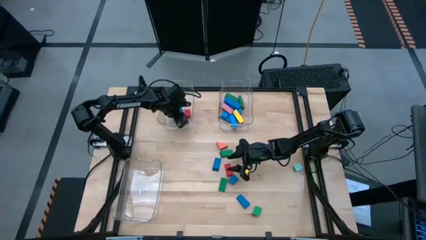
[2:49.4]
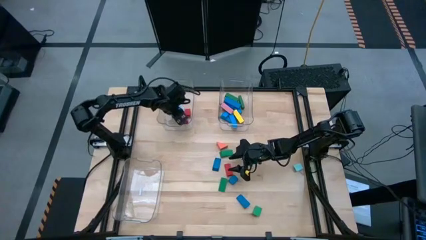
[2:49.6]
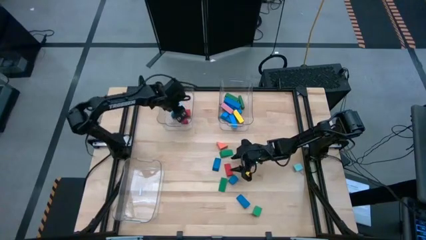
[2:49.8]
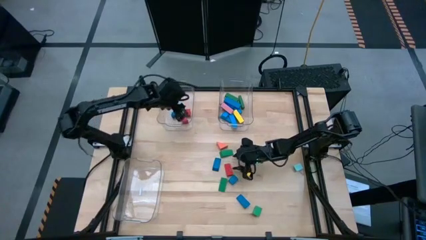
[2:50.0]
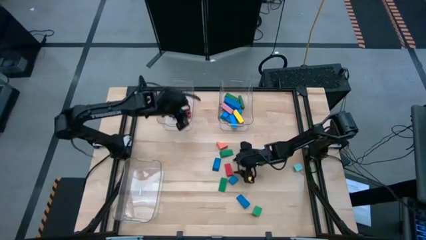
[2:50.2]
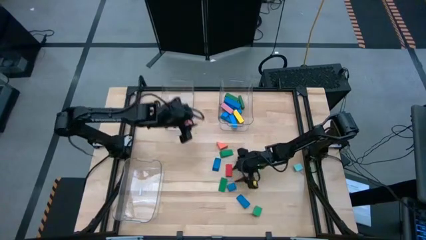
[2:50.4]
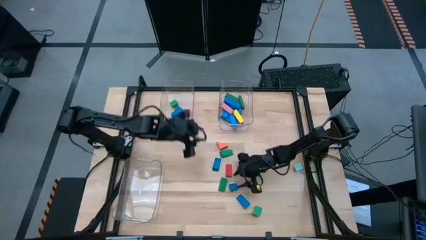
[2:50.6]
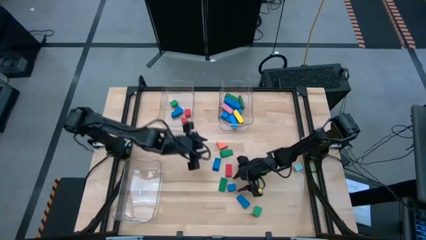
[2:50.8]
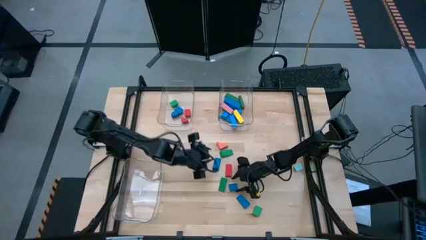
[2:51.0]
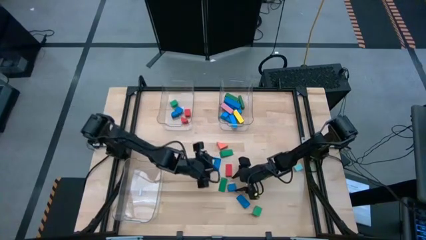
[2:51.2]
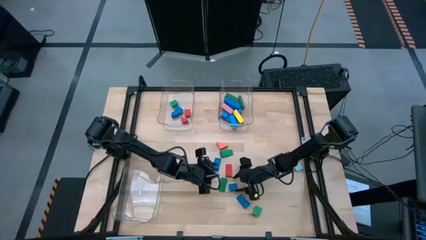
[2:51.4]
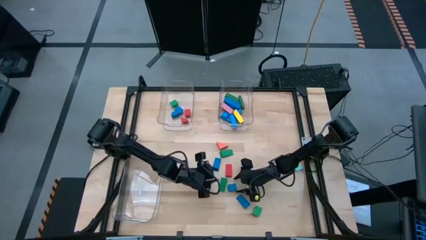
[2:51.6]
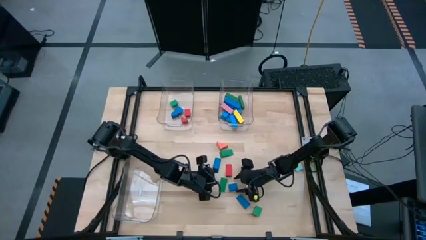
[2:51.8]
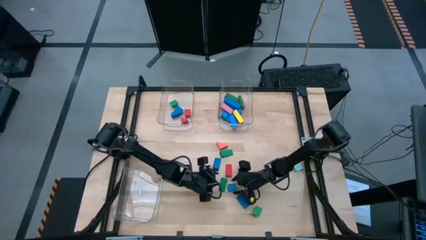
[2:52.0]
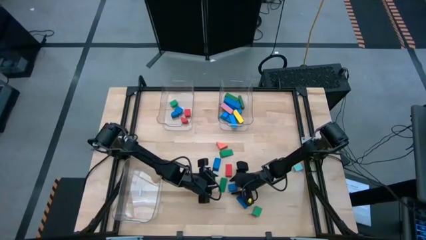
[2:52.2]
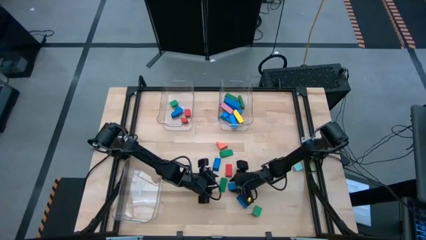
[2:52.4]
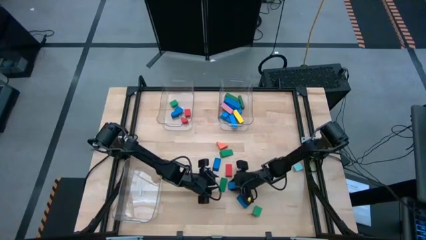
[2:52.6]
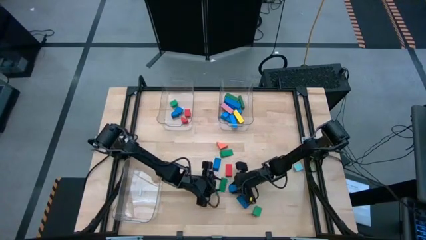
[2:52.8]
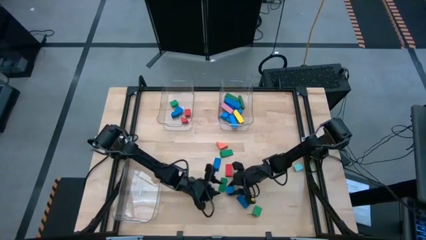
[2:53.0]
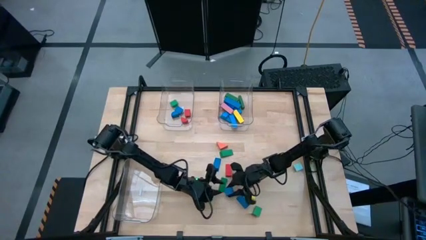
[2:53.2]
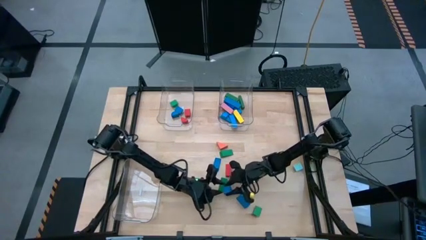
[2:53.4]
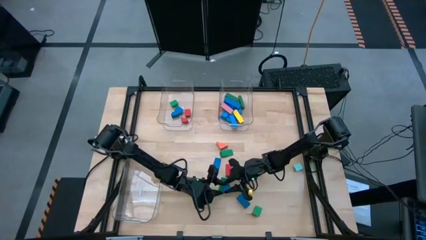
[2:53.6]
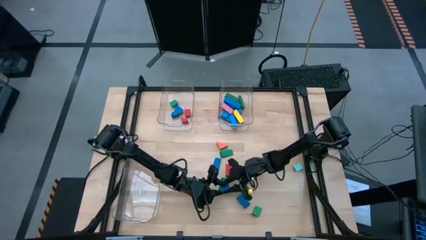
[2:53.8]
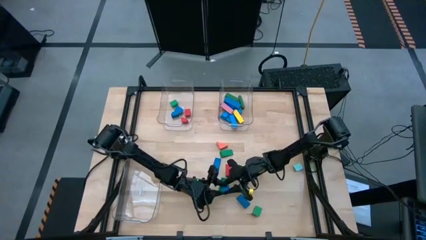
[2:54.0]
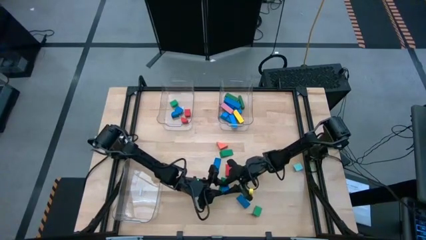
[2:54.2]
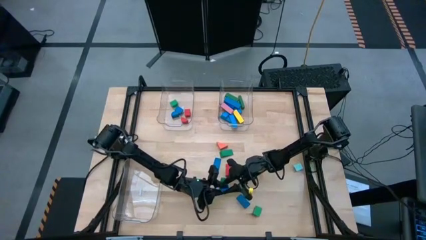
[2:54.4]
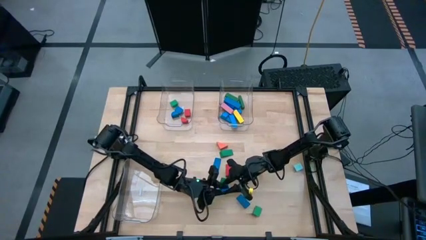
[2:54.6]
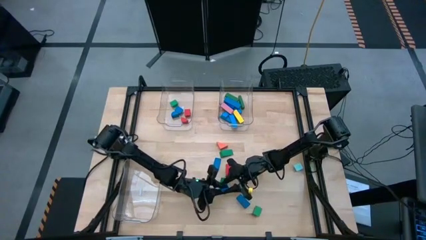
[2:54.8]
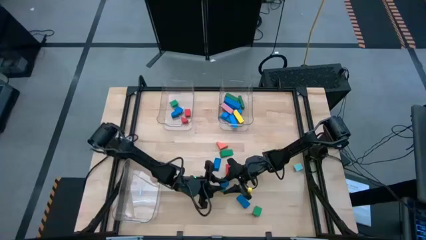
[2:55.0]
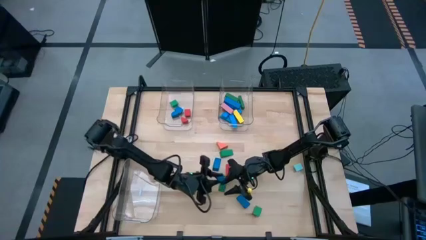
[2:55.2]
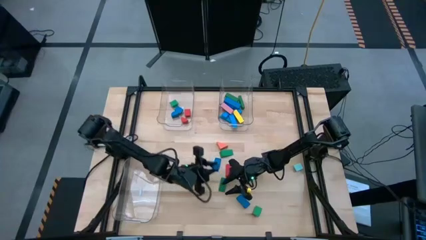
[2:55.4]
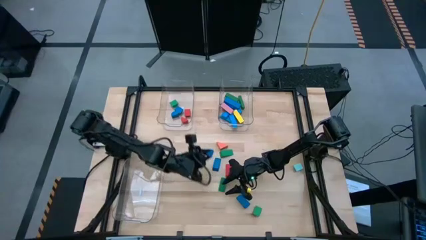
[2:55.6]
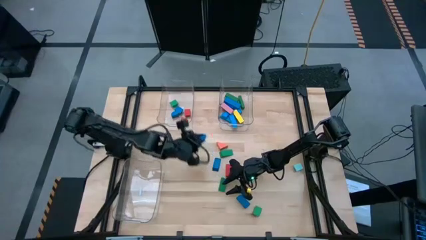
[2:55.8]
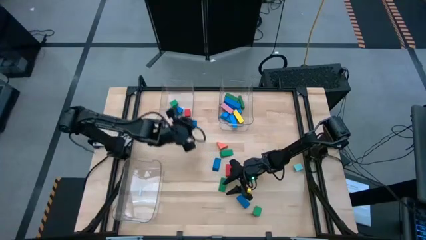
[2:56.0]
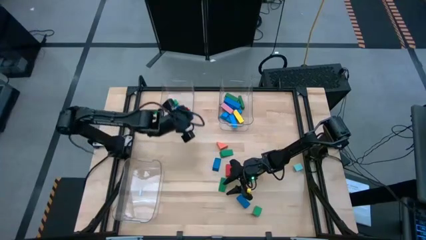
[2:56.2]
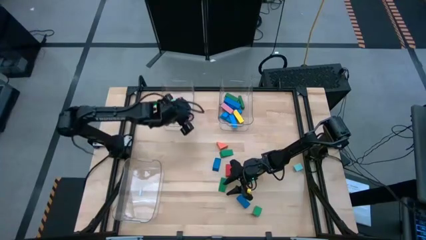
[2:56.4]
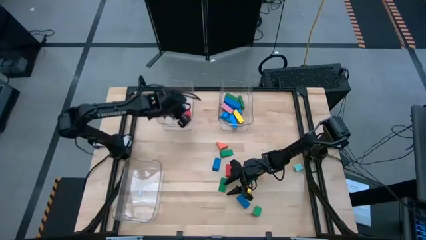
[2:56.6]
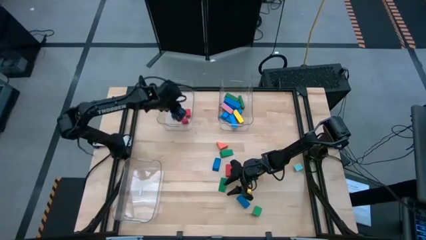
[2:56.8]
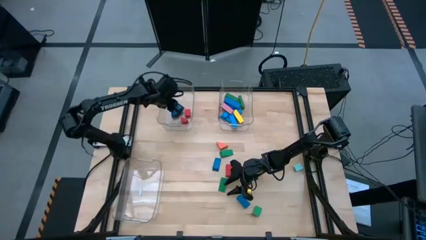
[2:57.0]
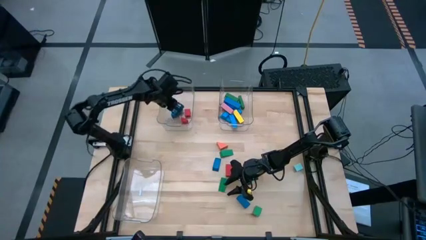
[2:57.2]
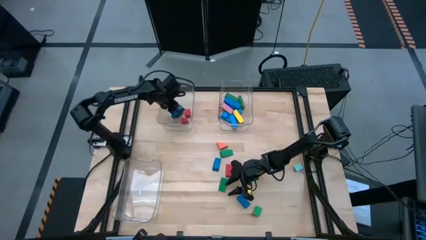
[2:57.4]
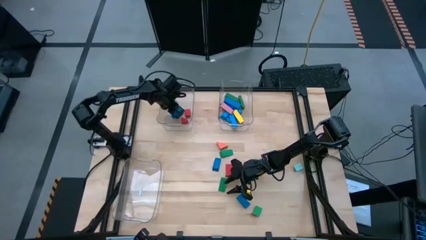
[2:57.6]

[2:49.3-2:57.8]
Task: Sort blocks by size
Put the blue half cylinder block into the top left transparent bin

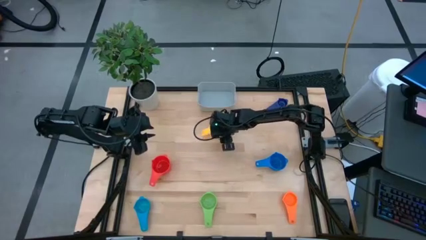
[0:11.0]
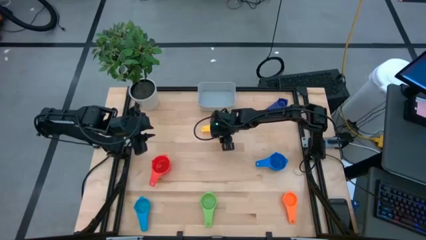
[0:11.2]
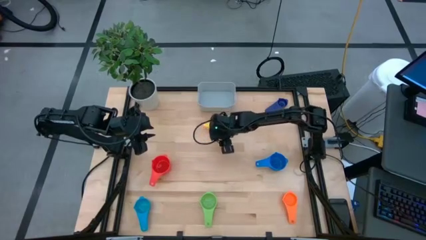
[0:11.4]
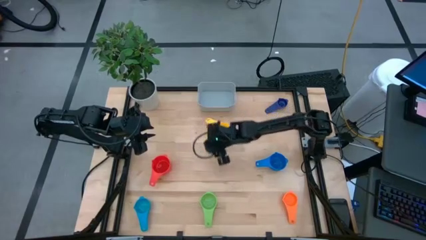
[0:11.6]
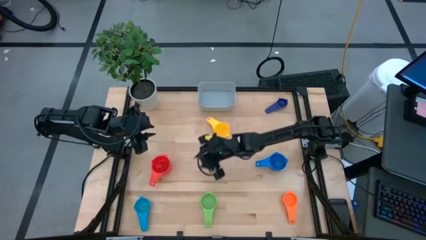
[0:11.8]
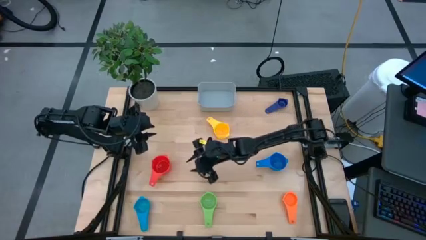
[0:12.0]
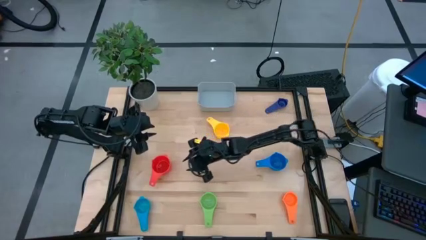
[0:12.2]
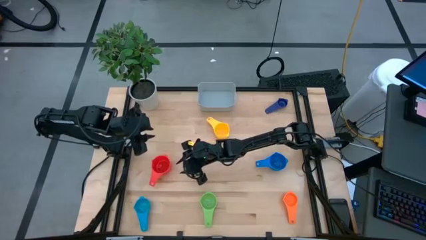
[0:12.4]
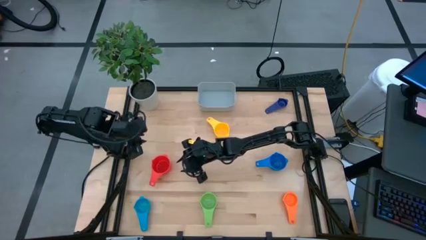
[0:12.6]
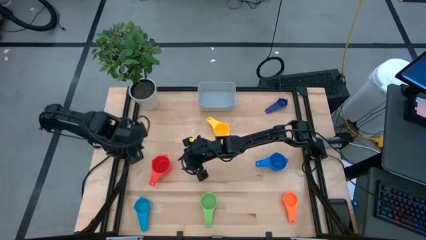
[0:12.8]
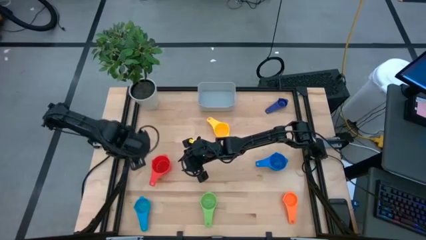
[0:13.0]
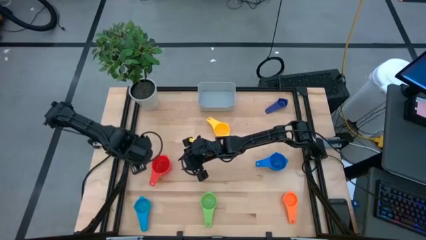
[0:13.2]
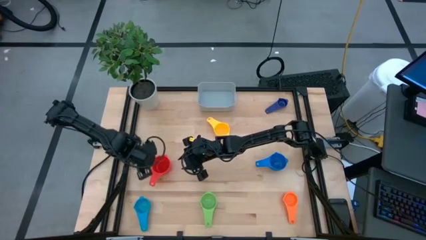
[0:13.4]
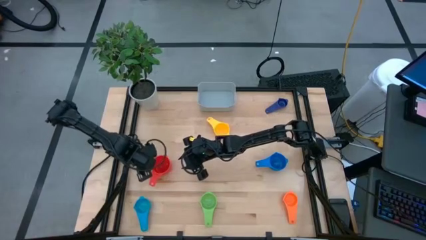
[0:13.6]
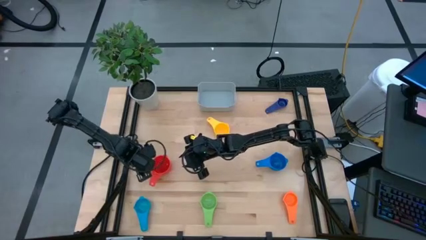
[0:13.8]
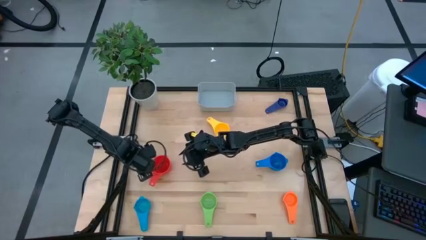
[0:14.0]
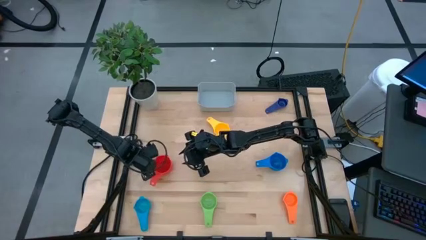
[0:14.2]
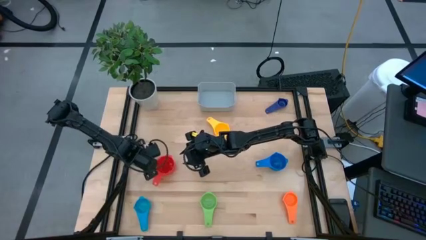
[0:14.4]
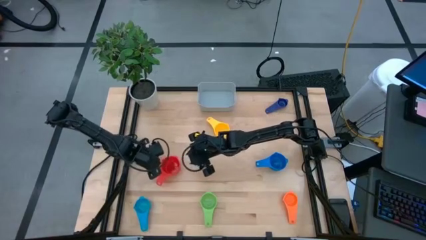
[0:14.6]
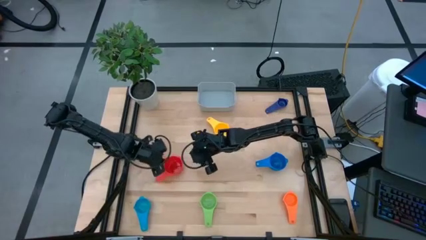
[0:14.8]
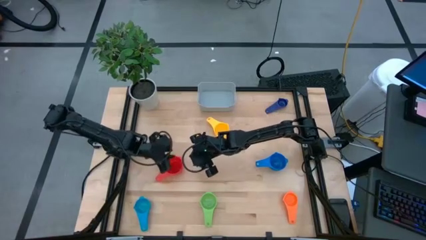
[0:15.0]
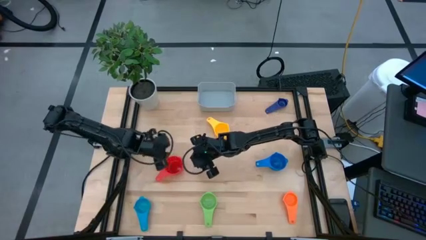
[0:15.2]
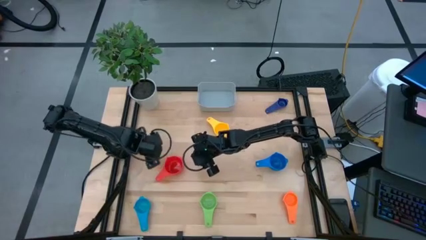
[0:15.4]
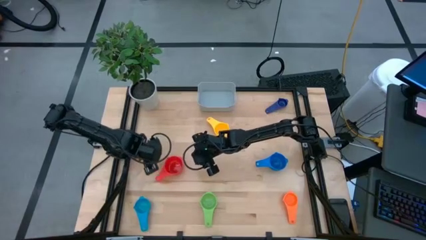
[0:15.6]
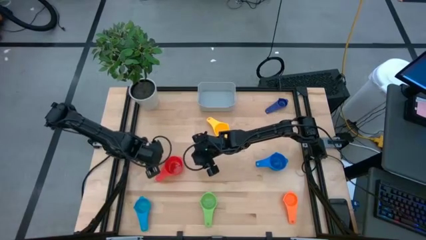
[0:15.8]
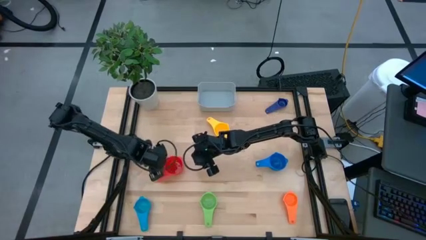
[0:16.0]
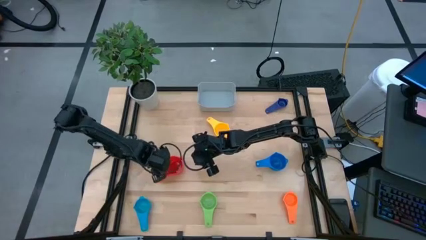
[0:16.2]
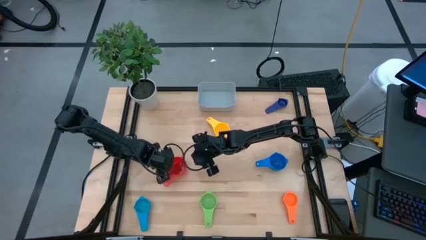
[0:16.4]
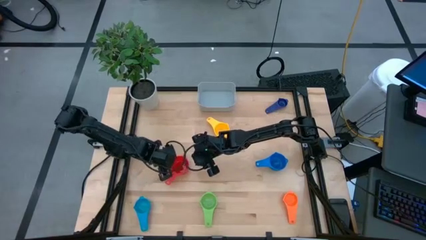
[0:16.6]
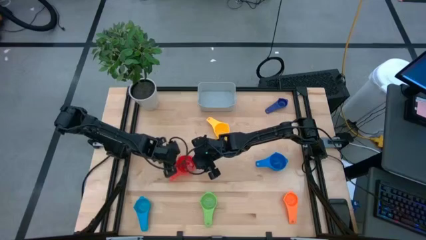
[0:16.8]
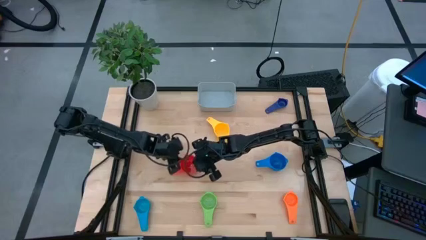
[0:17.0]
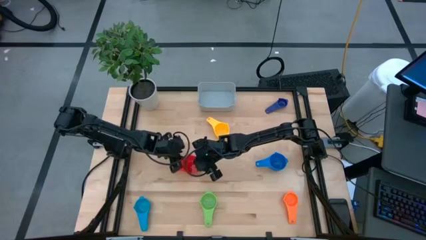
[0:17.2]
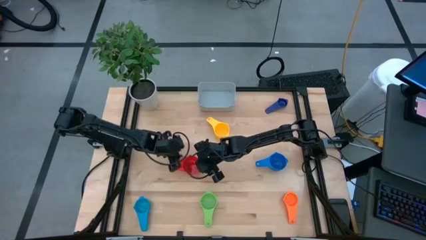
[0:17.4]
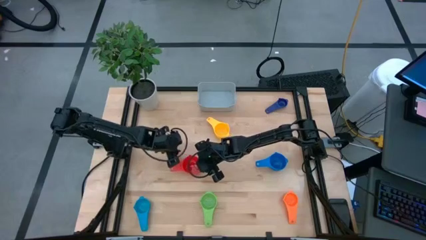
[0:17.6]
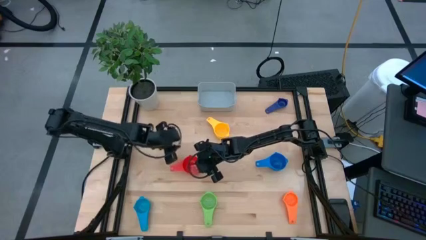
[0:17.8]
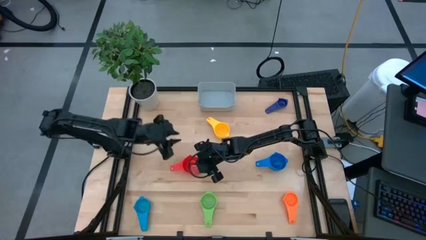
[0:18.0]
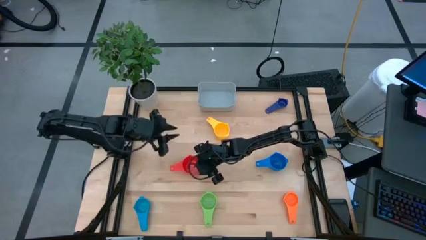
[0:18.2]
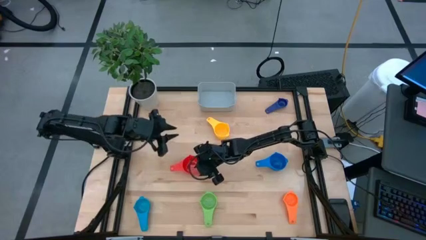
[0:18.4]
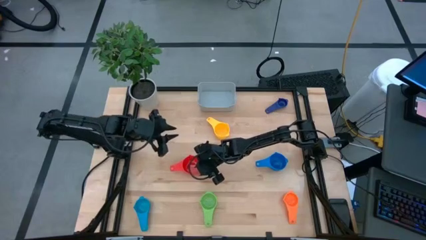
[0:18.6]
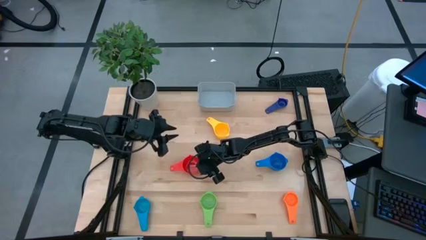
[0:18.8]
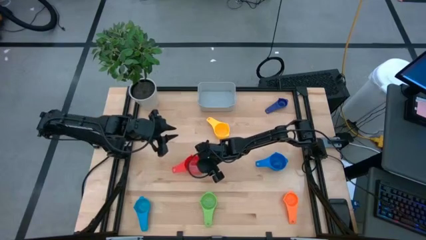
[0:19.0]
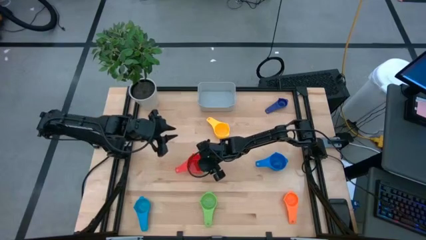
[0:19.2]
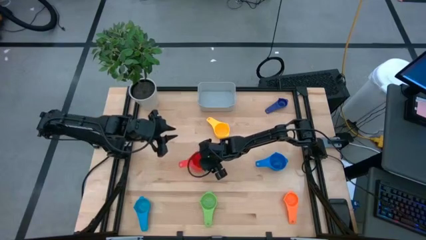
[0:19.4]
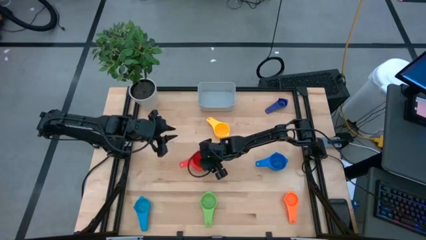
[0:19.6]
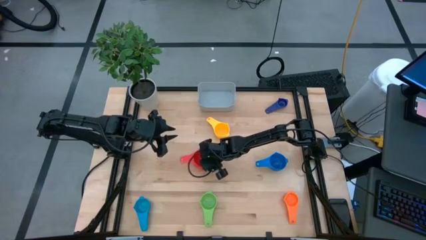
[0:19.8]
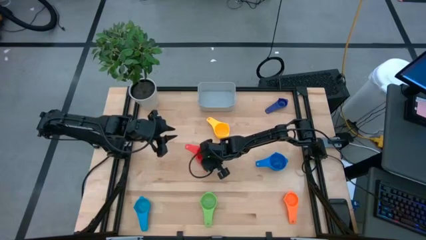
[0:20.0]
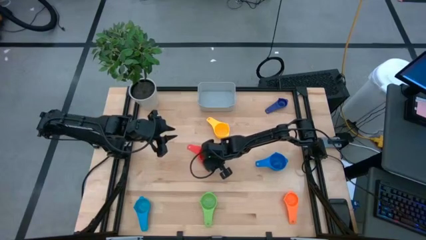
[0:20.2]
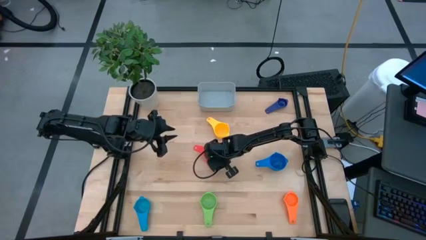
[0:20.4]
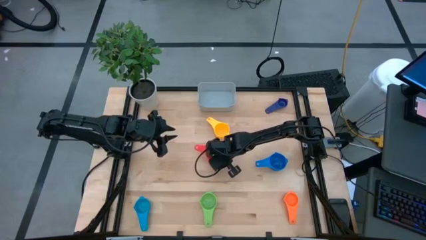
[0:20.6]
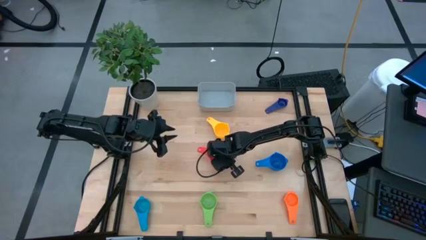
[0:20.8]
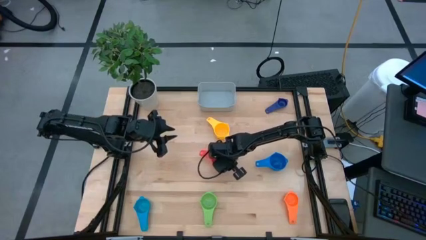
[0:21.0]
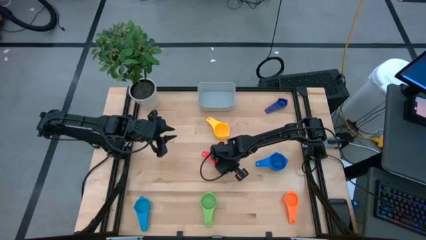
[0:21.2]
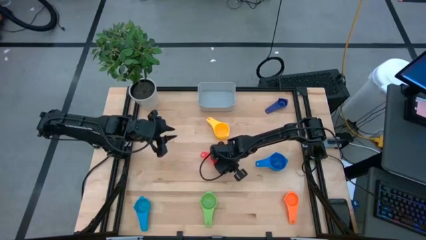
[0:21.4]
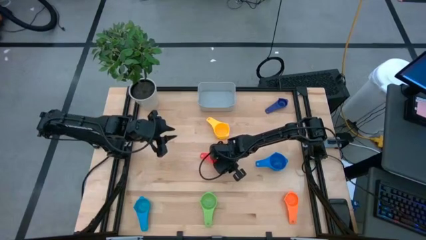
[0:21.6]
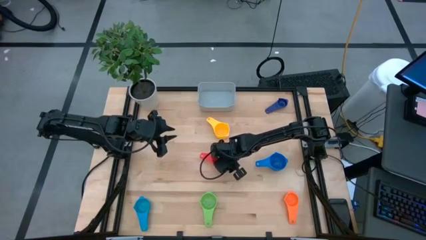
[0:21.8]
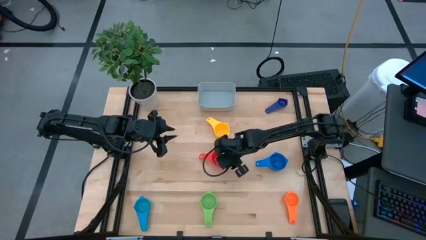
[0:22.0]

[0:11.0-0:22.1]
Task: Nest measuring cups in basket
Move the red measuring cup to the middle of the table
